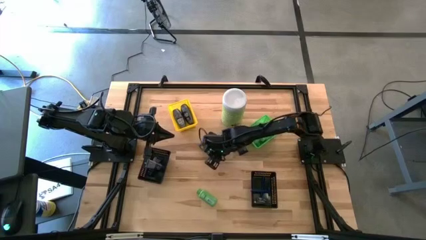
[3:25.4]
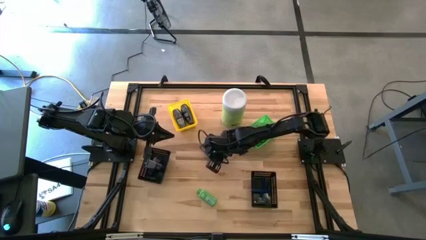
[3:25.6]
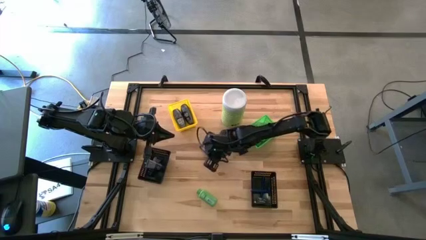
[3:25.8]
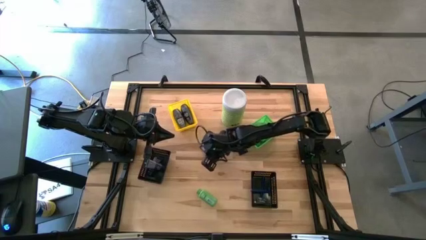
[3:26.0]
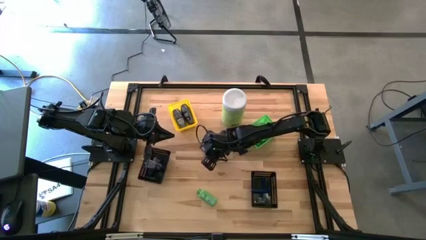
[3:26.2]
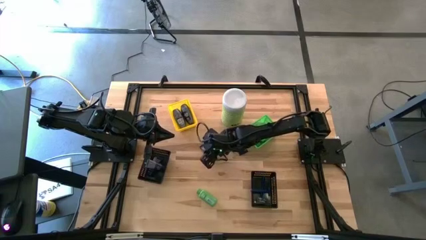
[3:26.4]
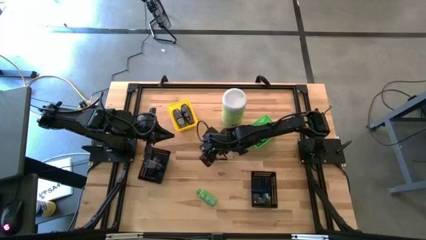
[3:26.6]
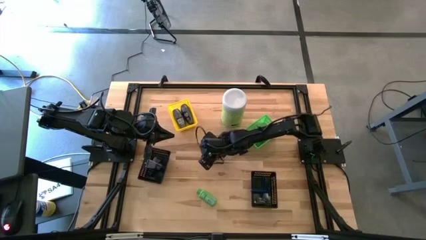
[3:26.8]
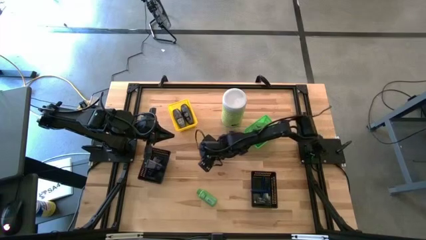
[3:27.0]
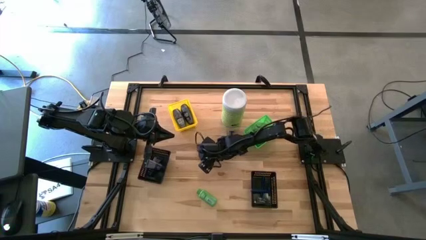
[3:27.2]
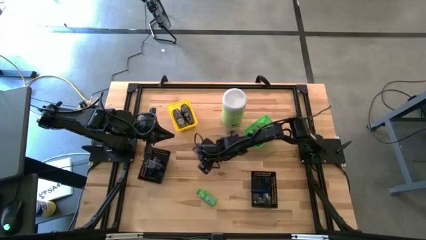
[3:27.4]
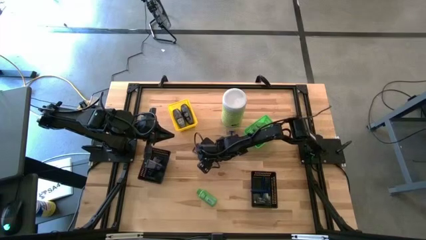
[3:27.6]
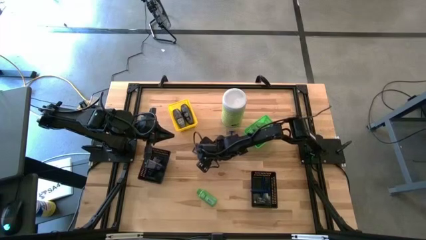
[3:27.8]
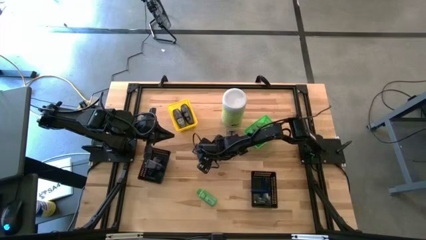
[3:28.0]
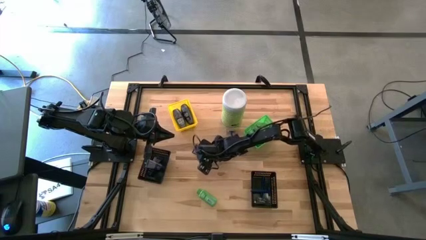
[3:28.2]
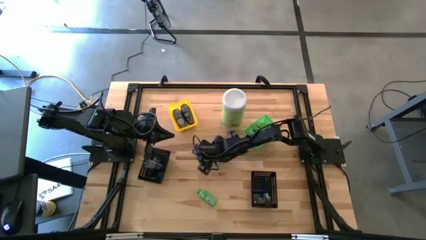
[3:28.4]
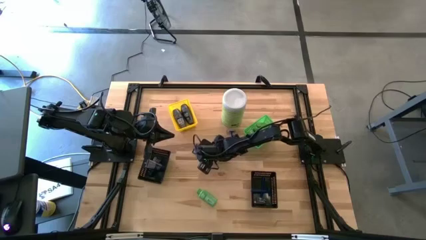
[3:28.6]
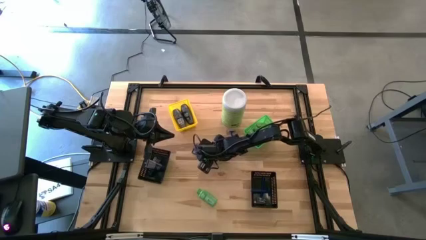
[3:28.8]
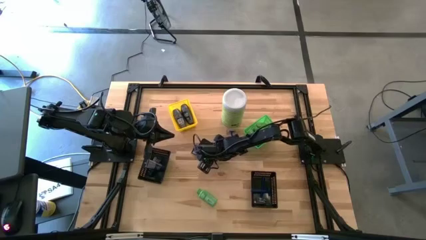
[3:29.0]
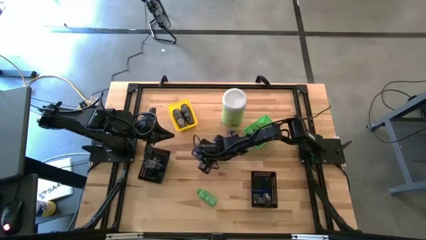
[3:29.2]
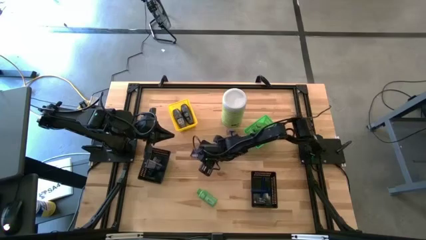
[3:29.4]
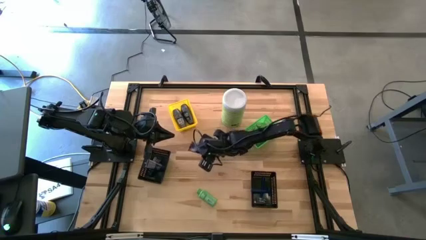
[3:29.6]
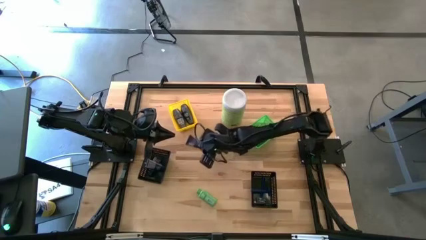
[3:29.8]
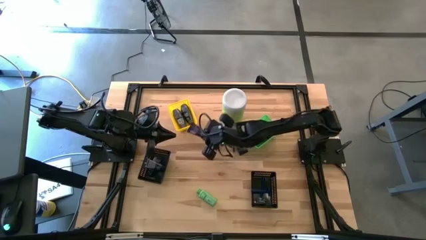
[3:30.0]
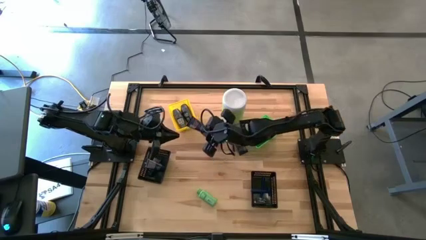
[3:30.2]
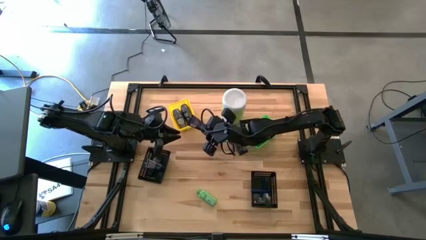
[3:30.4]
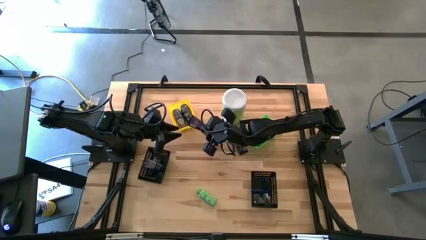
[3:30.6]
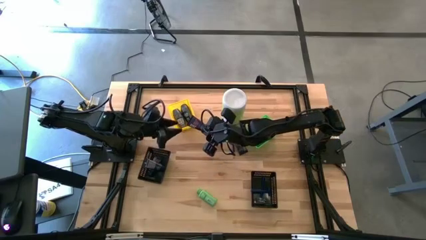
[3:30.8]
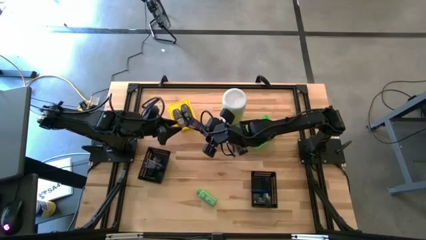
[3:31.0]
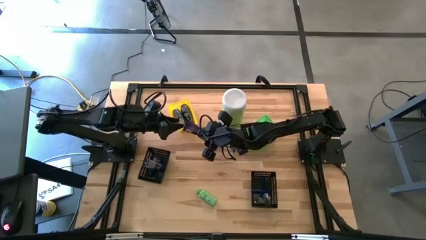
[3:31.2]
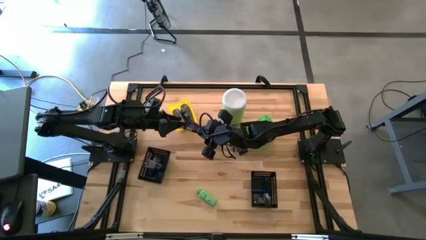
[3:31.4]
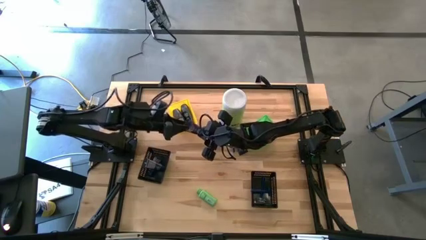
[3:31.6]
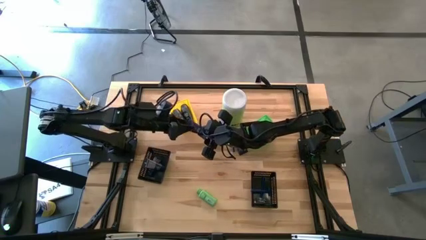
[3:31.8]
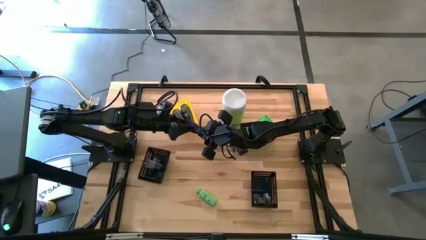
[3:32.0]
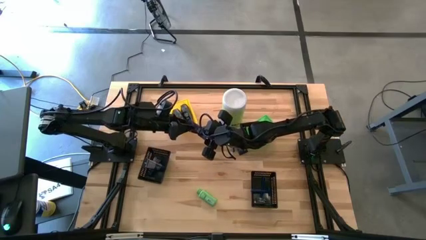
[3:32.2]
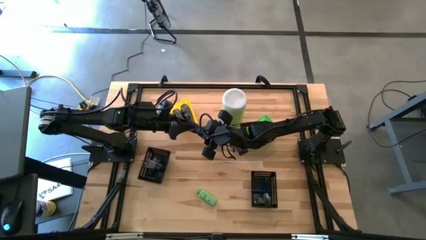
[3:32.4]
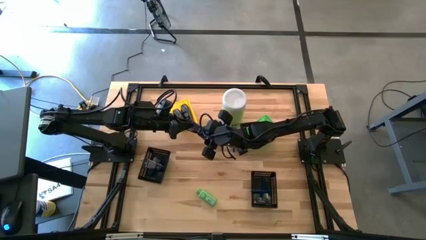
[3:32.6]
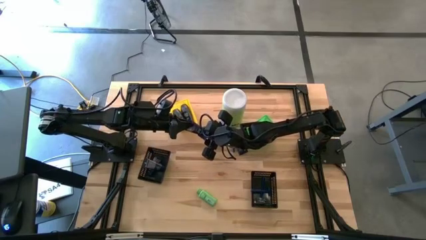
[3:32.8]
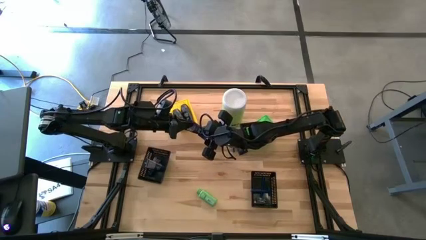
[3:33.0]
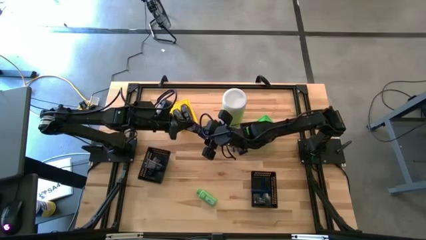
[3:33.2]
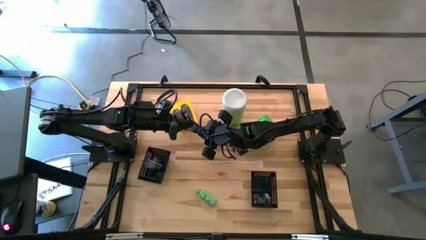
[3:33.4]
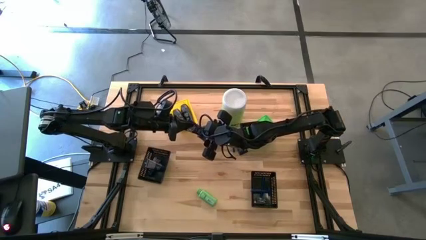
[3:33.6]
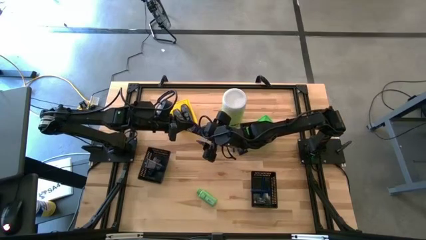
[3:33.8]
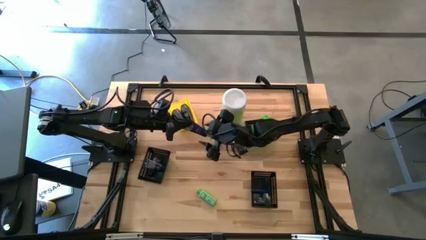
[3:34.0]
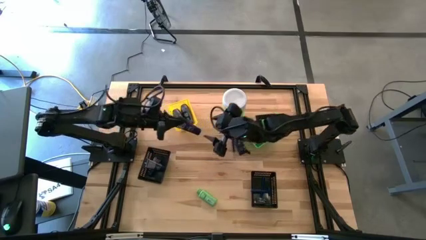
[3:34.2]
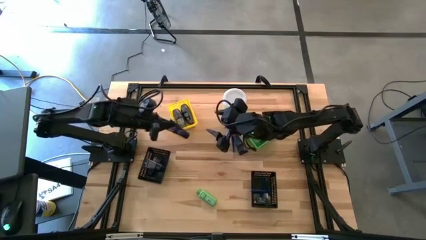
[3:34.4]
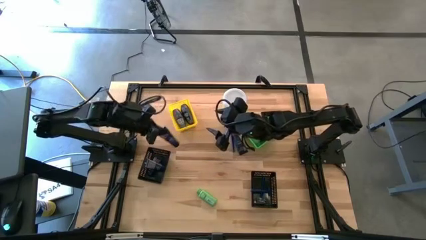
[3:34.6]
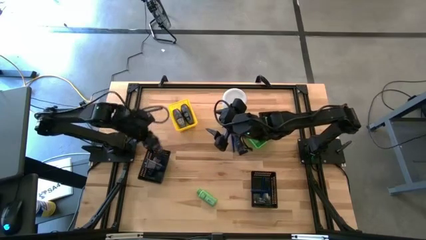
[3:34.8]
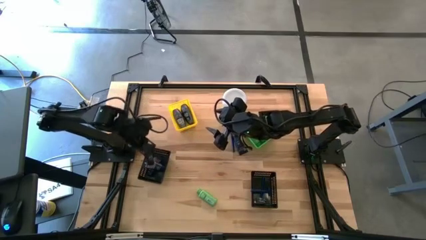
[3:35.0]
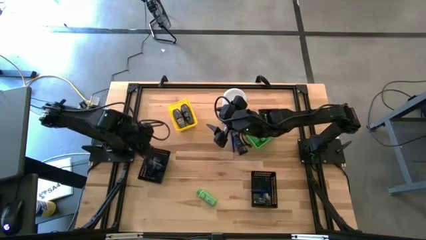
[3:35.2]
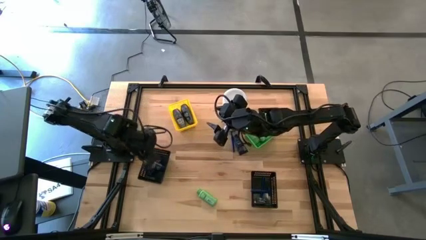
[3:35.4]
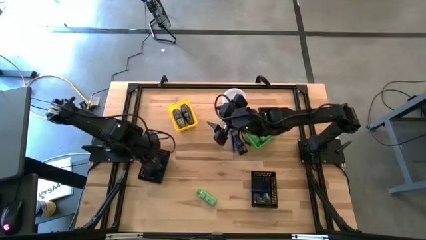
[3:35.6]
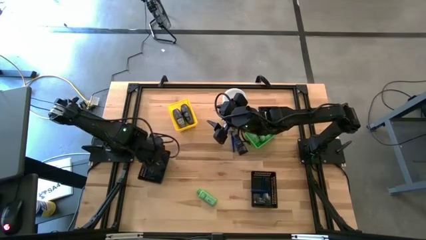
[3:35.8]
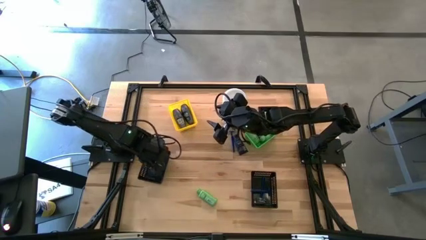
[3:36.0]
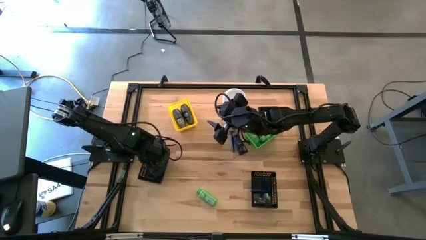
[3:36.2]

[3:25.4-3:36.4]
Task: Pick & Place Travel size toiletries
Put the shave cream into the left black bin

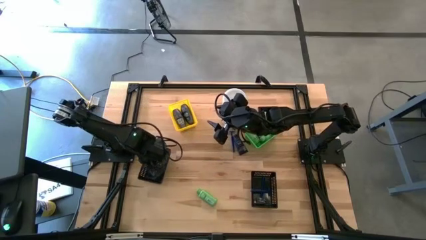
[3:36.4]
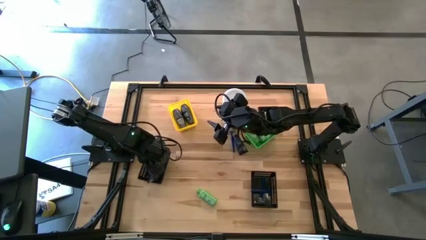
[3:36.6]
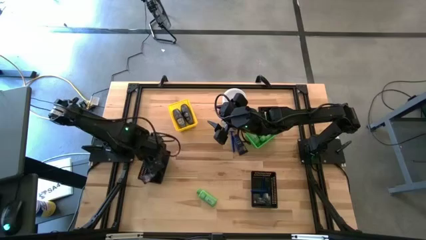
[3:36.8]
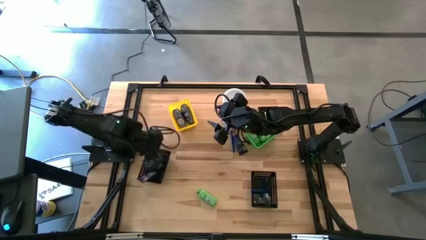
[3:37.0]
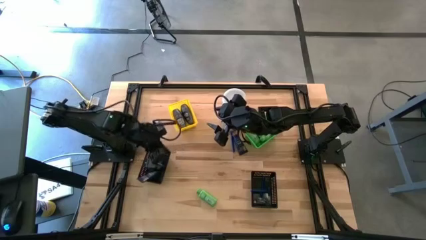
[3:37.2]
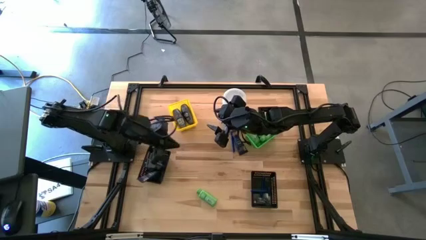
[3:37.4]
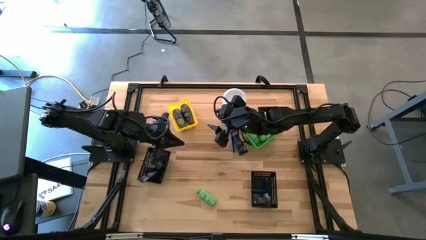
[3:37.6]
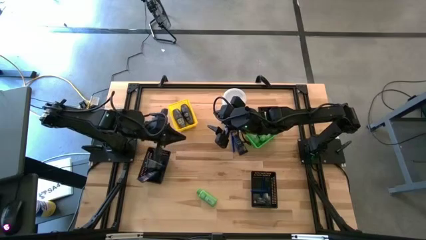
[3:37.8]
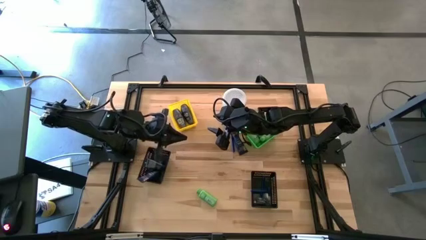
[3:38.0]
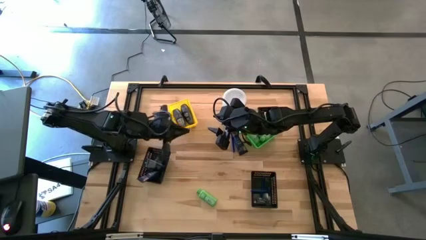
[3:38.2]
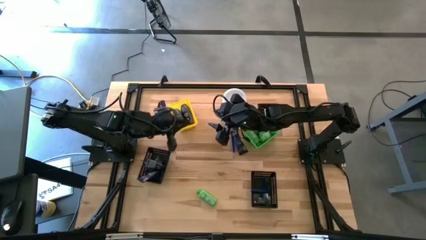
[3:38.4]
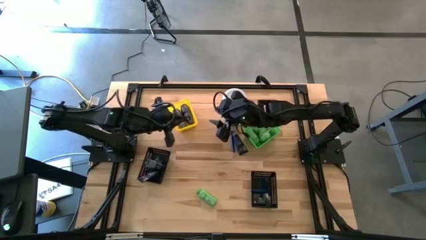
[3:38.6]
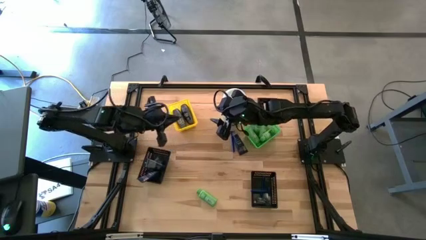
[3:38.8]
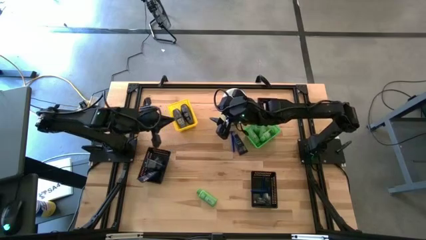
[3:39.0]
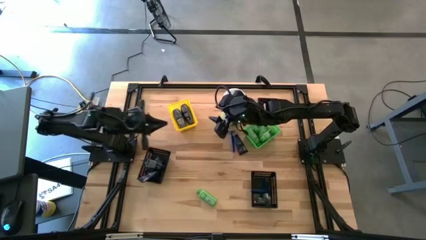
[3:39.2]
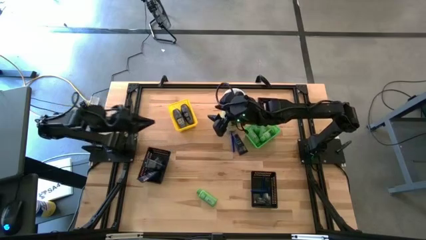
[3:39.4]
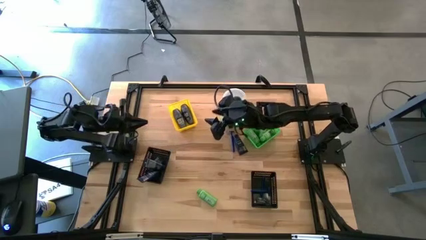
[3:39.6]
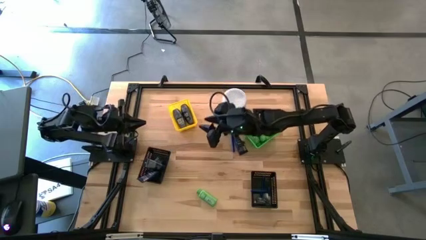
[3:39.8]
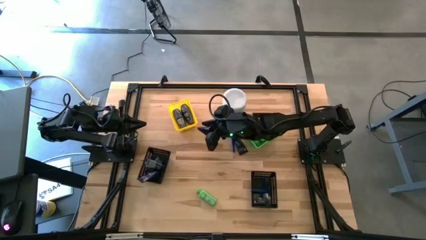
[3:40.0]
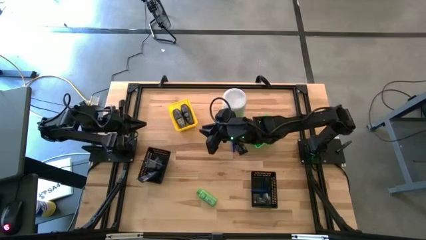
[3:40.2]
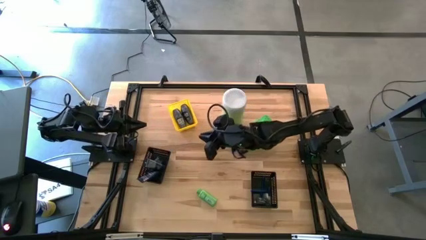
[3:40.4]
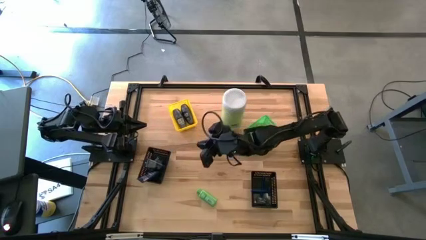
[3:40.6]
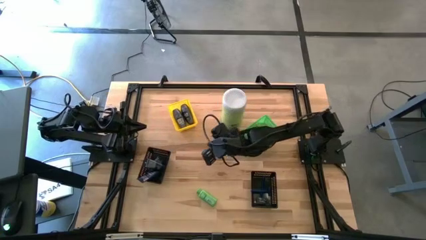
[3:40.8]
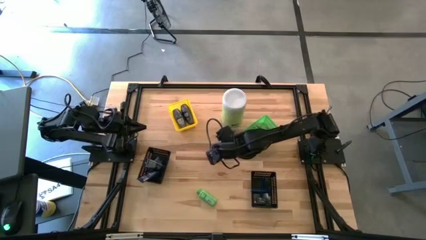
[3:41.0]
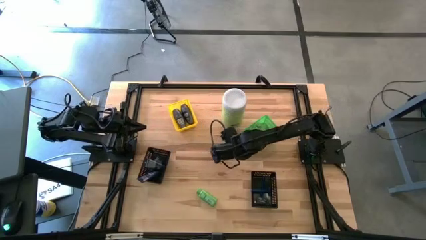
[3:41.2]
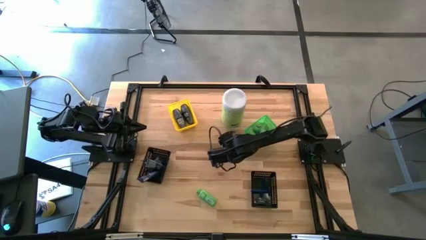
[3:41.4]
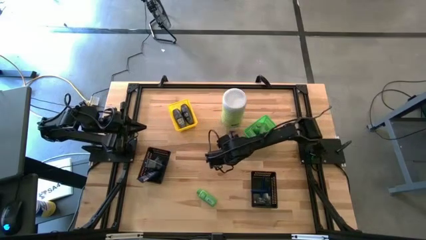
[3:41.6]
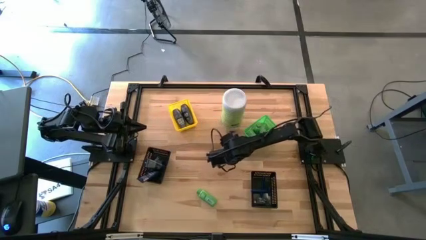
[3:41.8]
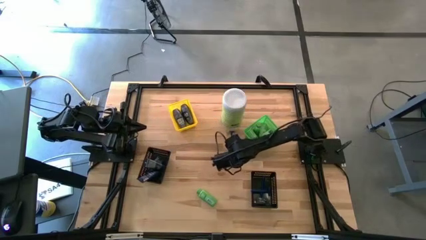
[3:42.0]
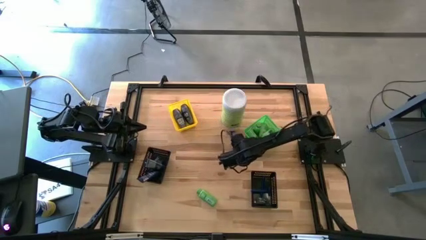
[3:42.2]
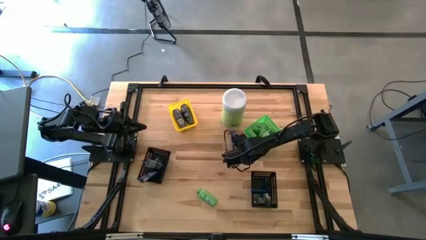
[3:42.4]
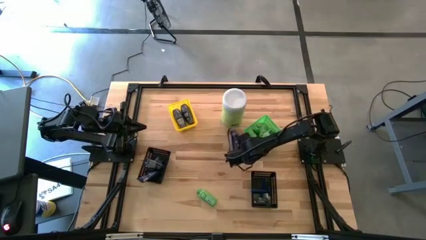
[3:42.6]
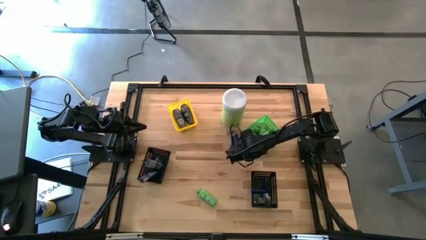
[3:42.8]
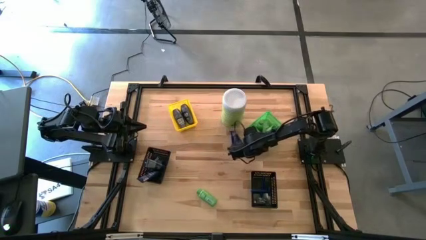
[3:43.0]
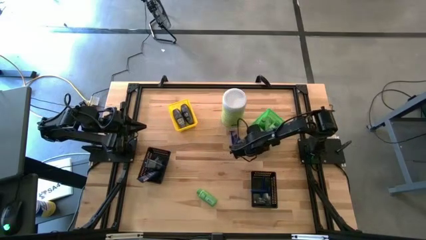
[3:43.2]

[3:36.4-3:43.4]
Adjust the green bin
